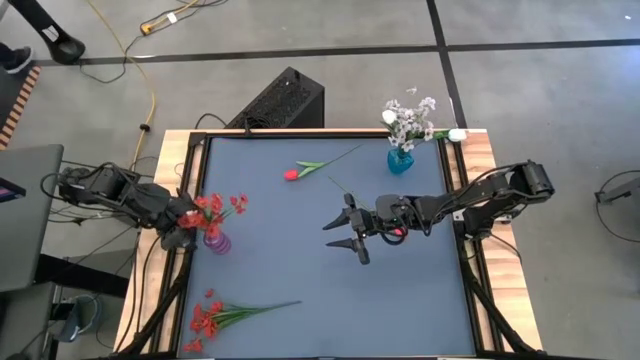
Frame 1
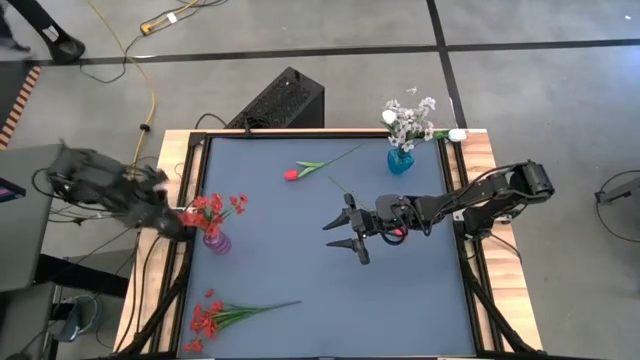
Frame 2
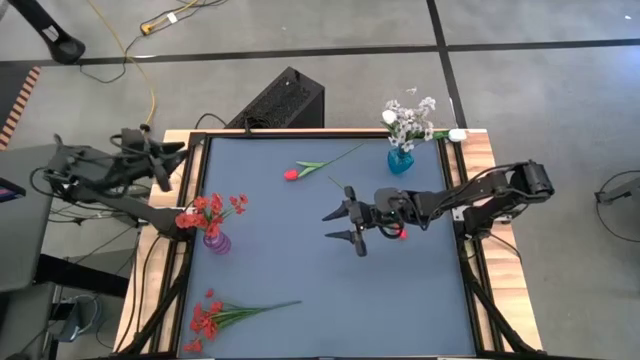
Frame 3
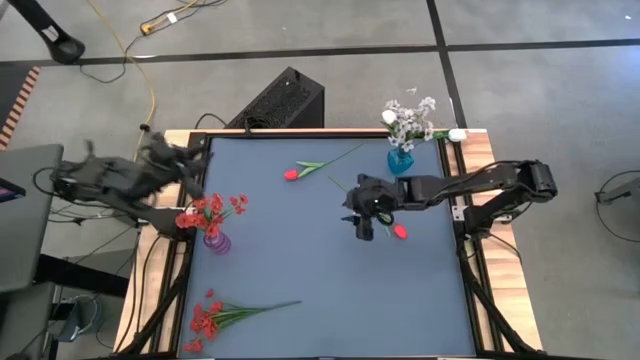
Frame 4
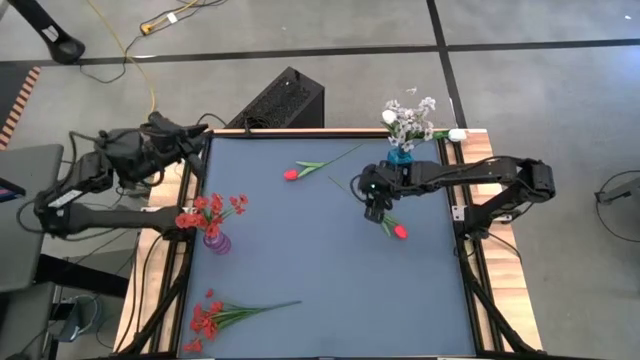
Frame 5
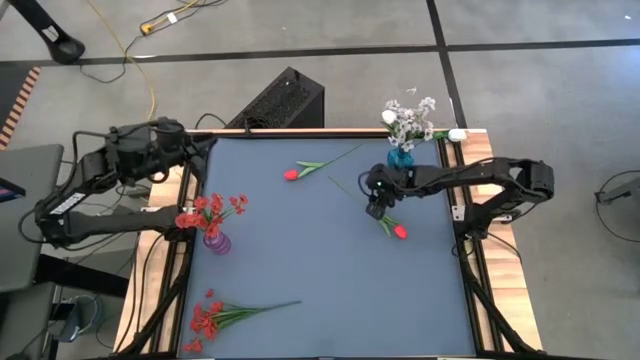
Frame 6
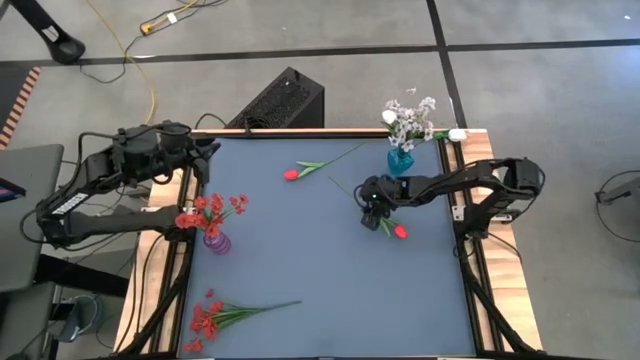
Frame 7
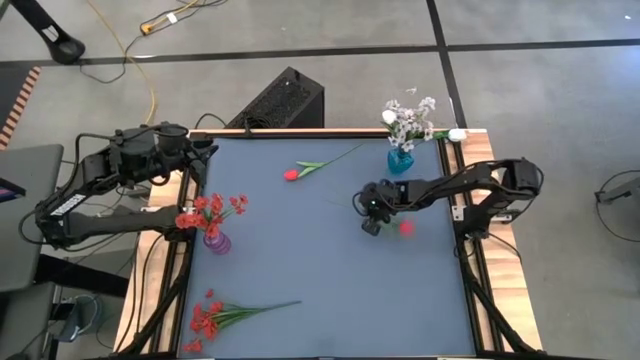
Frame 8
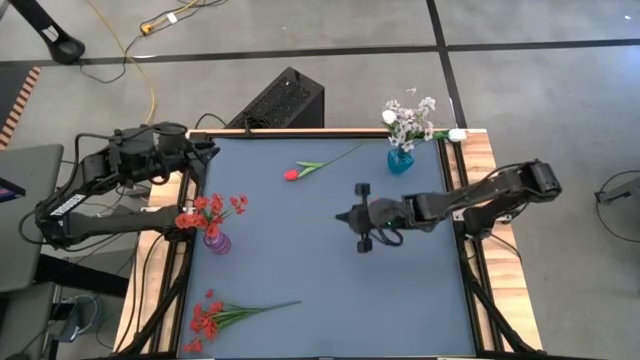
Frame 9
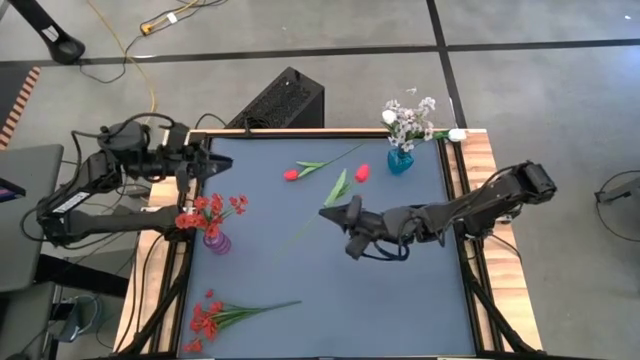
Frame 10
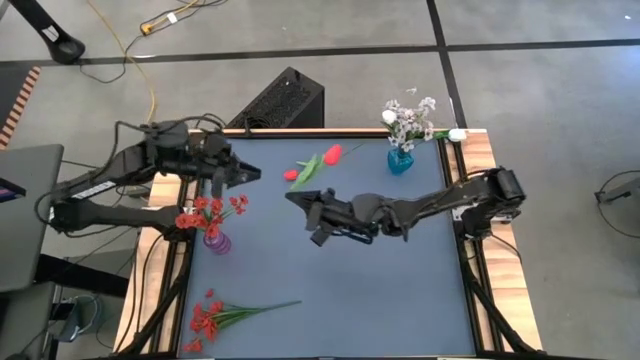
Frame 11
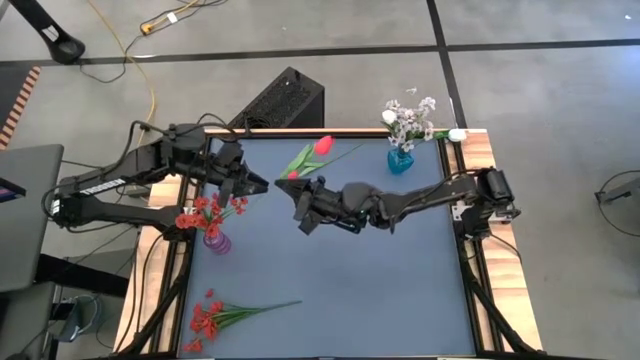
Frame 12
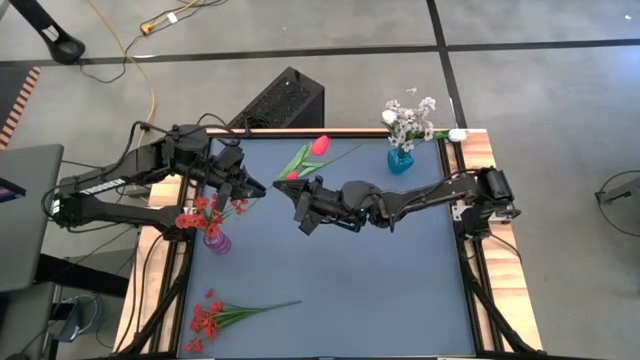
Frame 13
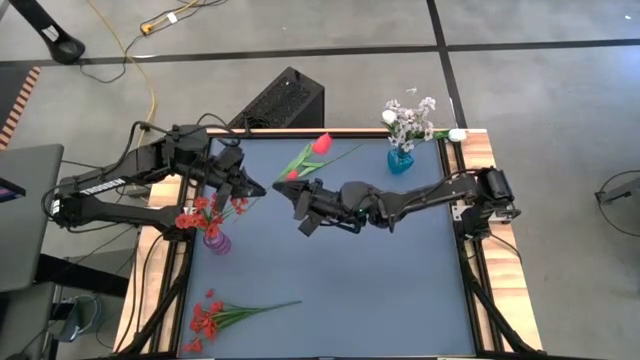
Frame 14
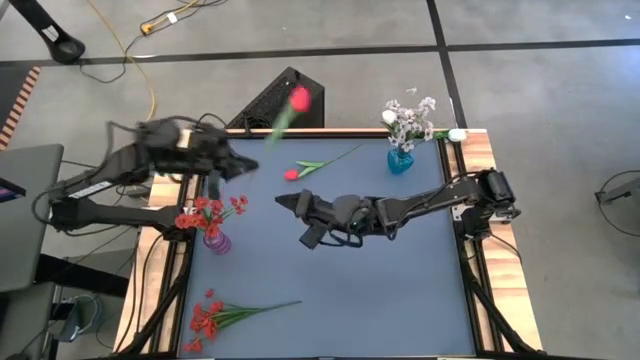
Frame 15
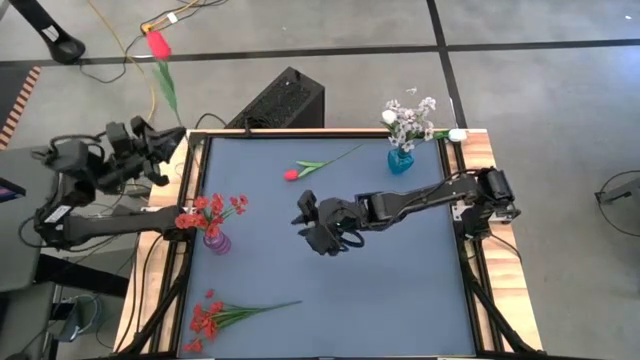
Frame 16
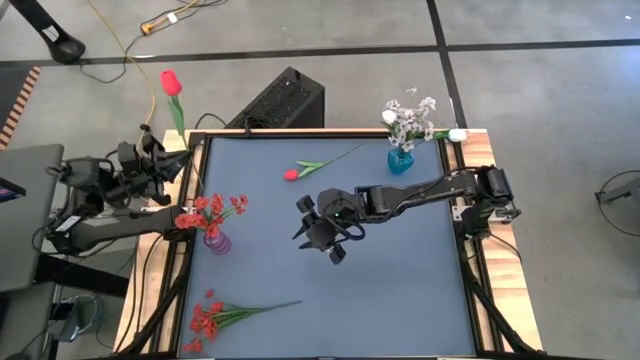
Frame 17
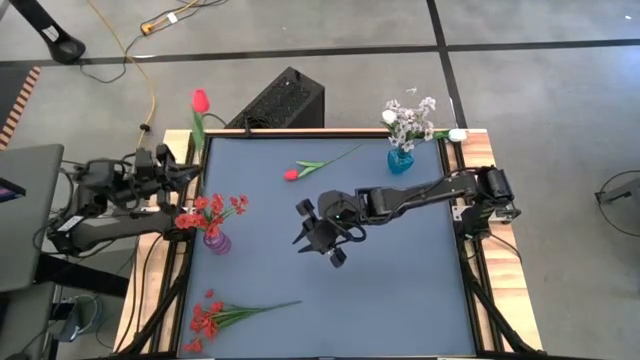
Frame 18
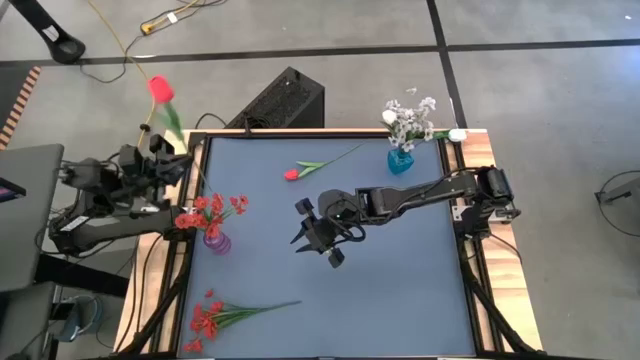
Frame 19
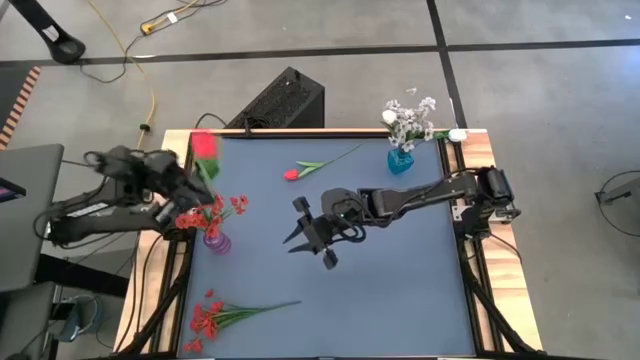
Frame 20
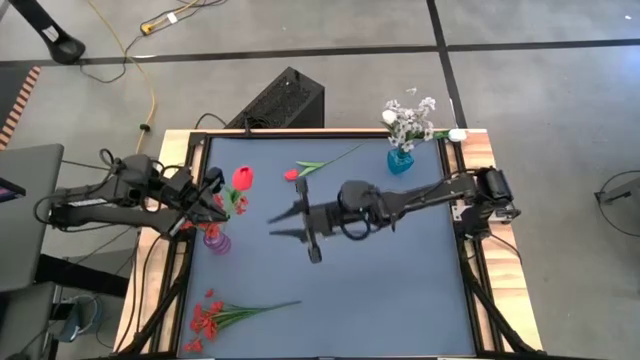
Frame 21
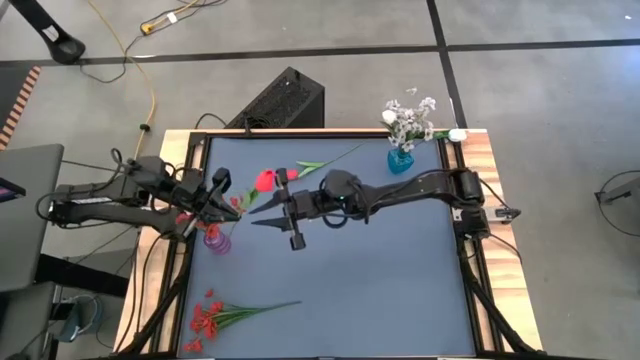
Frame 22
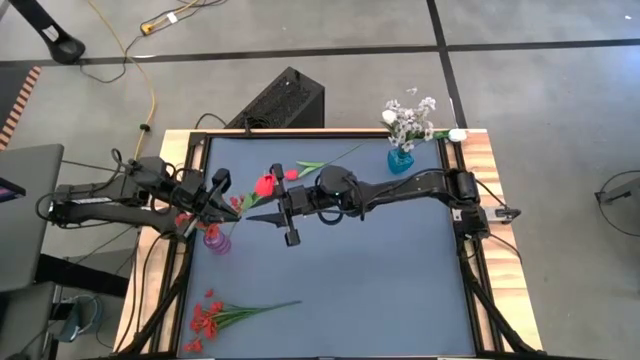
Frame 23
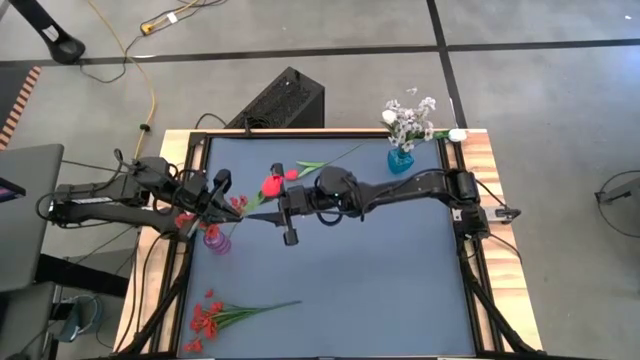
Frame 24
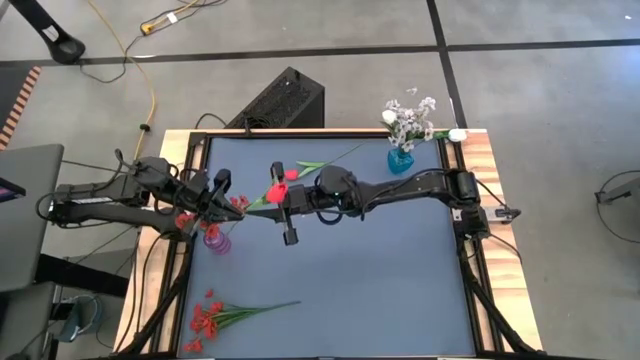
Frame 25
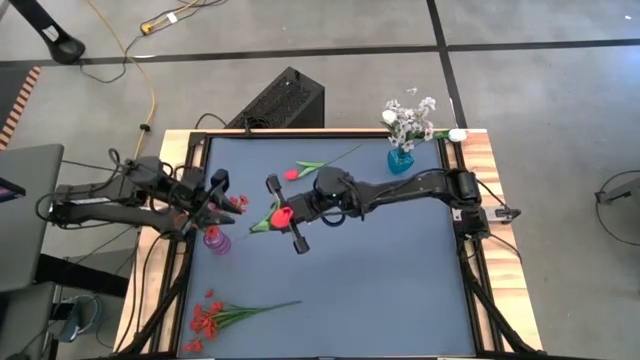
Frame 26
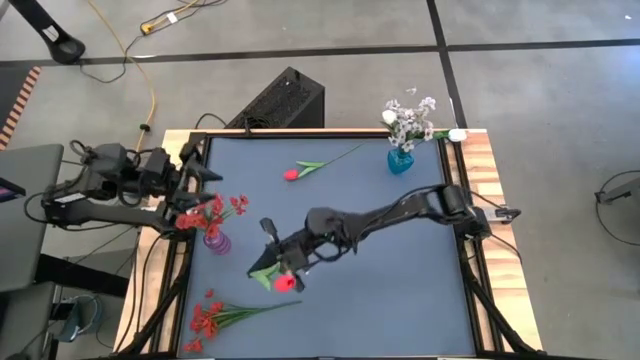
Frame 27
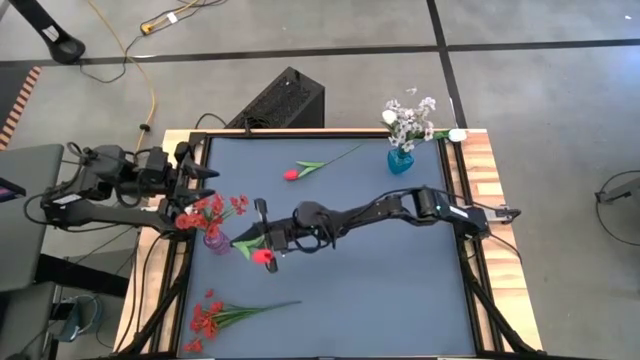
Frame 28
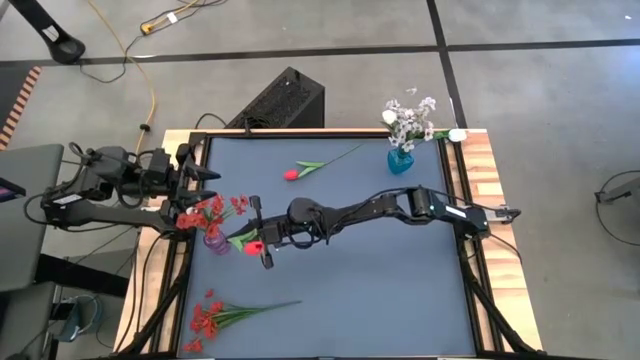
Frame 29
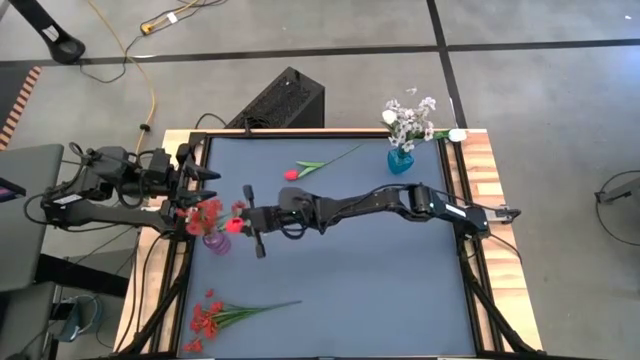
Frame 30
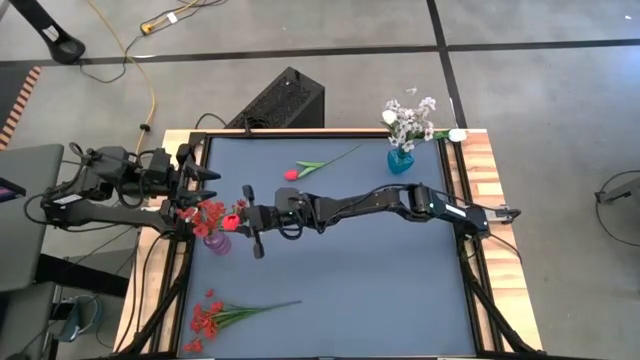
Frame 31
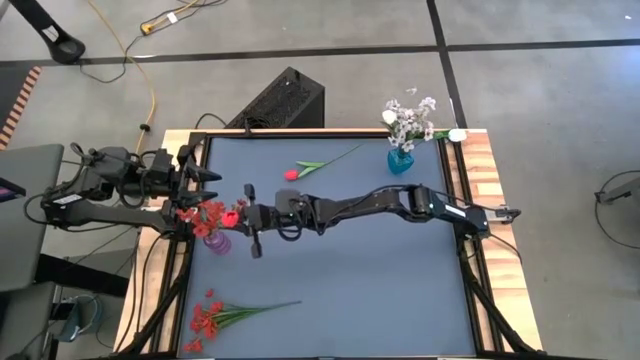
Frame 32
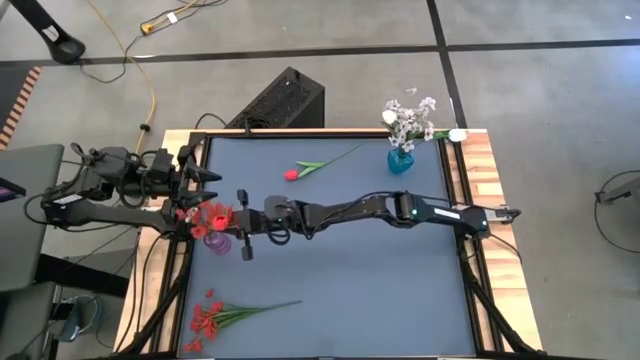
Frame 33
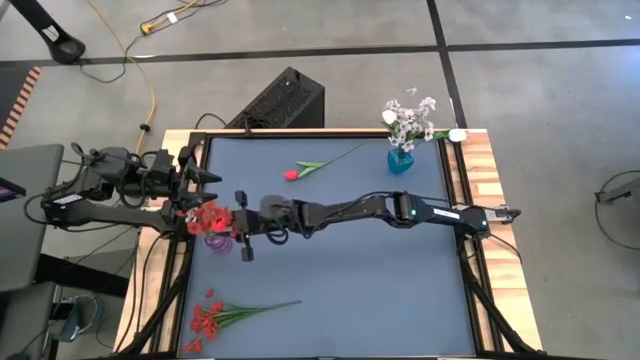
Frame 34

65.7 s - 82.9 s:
Task: Sort flowers into vase by color
Put the right red flower into the purple vase

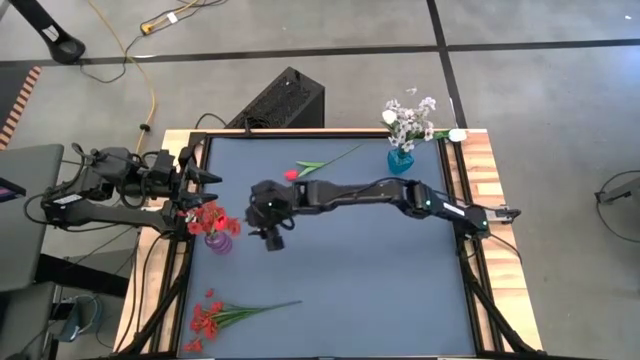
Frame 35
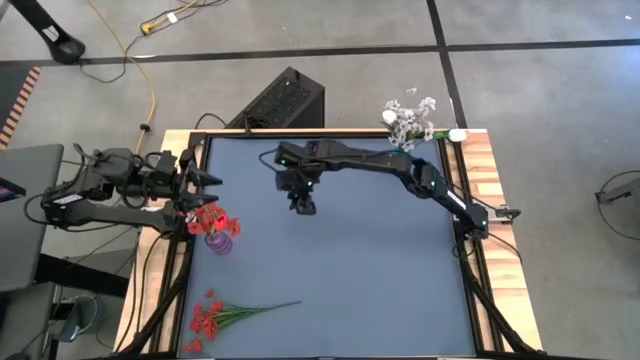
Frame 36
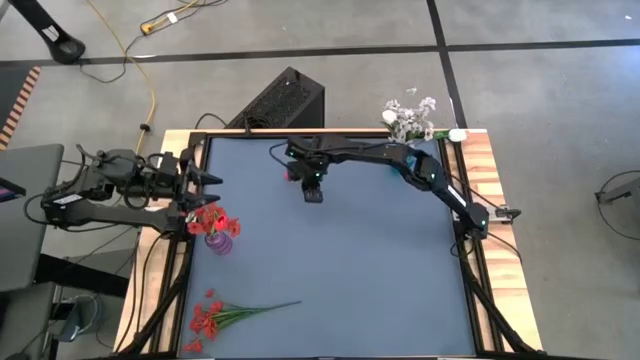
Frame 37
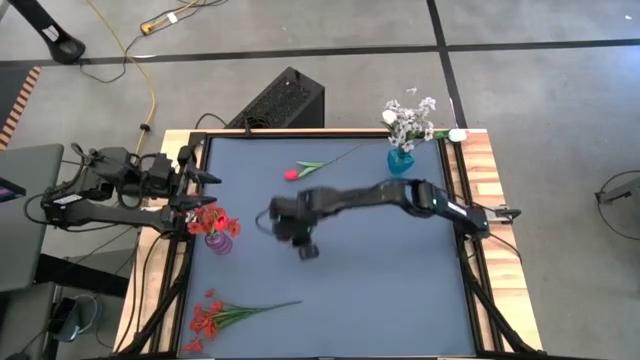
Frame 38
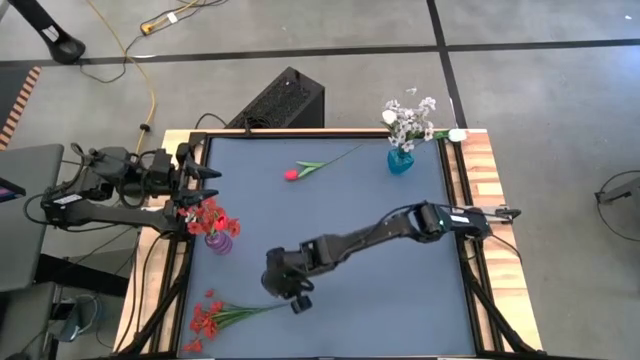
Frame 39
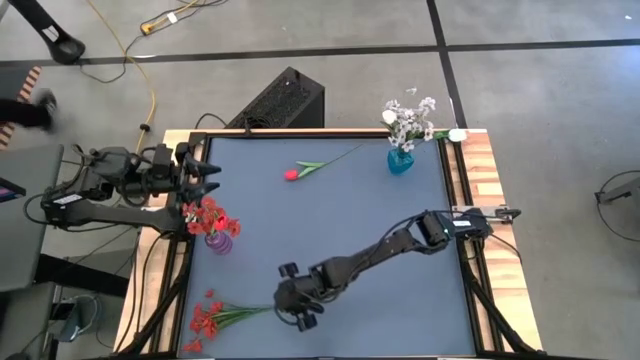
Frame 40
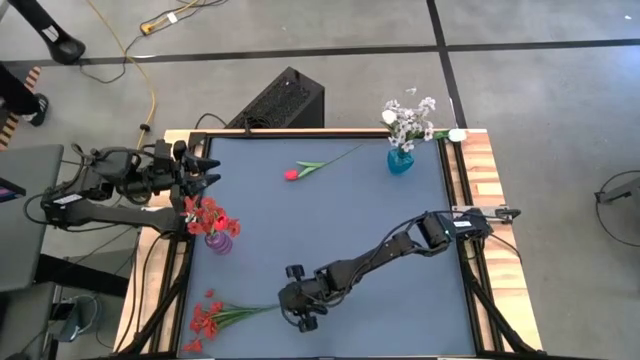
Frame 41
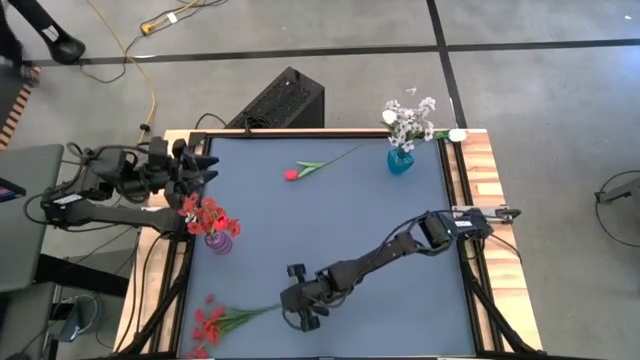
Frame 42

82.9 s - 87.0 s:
Put the red flowers into the purple vase
